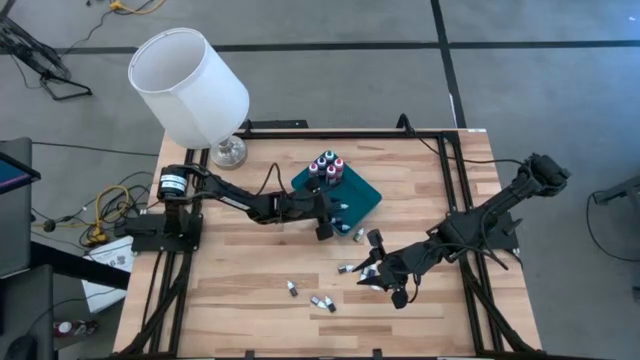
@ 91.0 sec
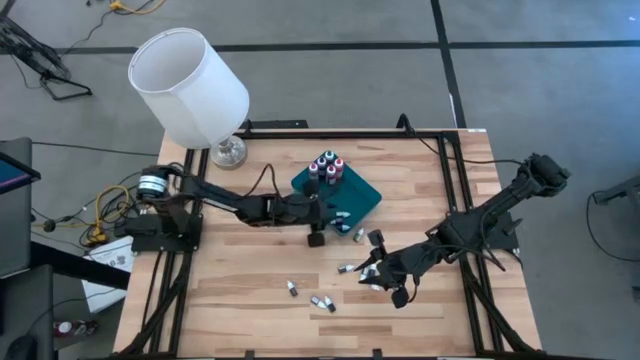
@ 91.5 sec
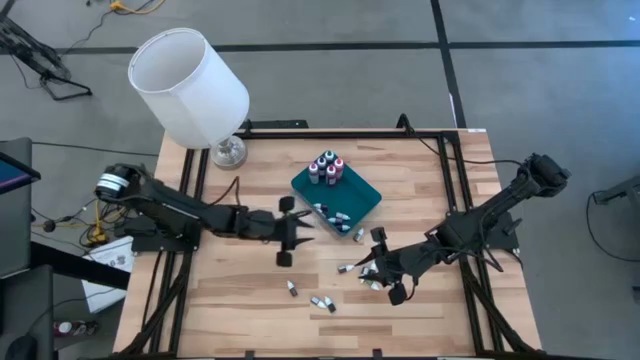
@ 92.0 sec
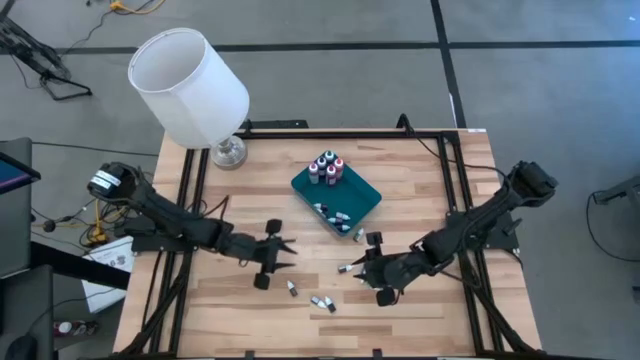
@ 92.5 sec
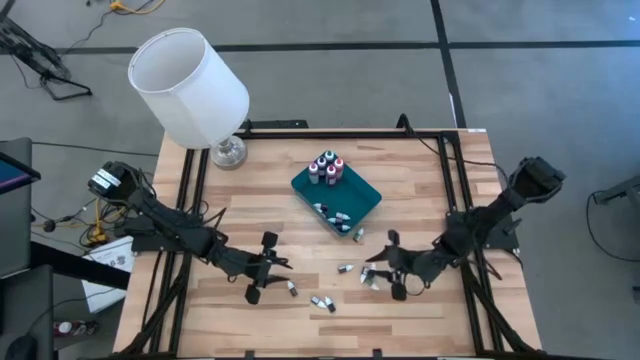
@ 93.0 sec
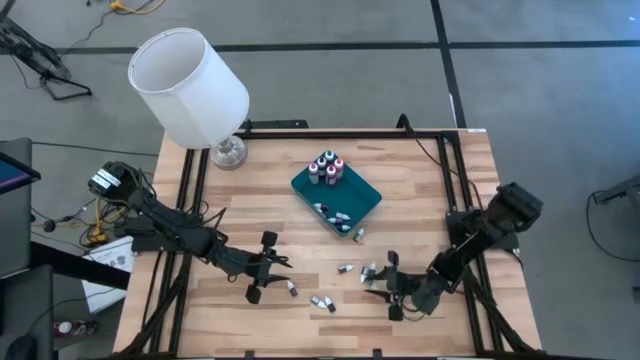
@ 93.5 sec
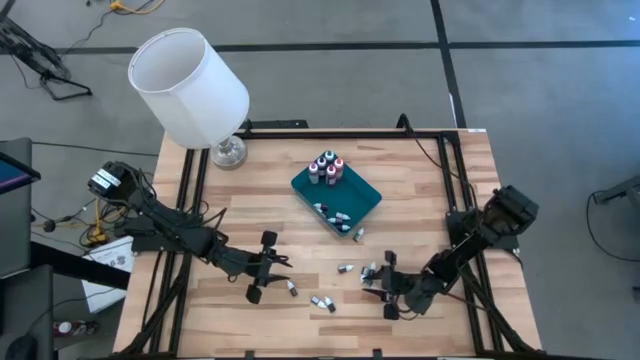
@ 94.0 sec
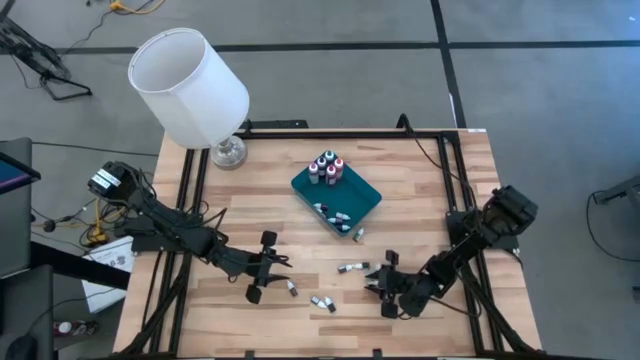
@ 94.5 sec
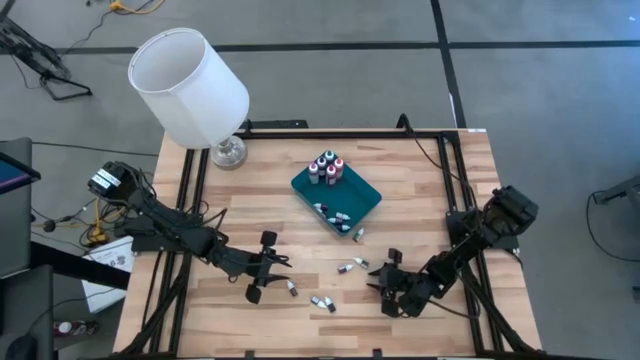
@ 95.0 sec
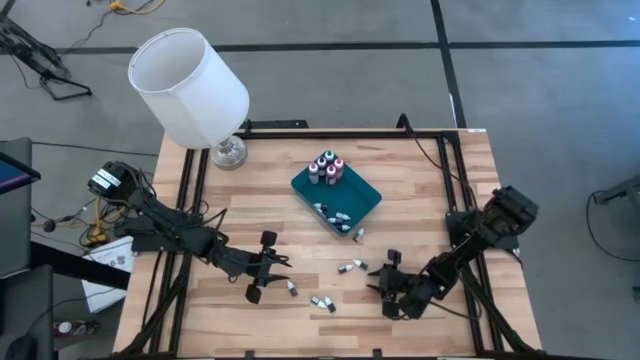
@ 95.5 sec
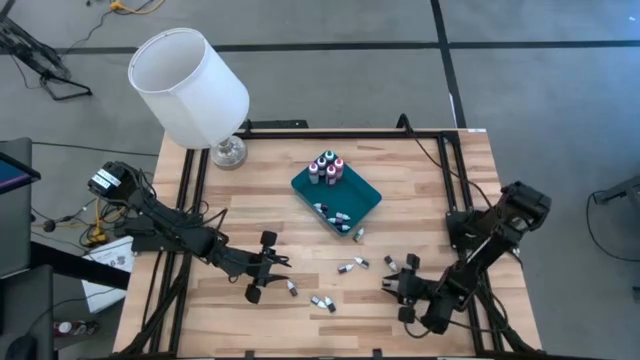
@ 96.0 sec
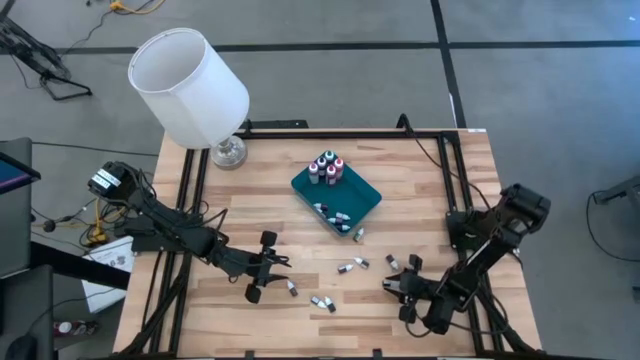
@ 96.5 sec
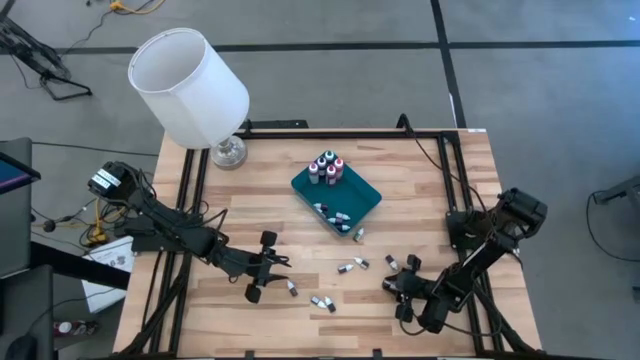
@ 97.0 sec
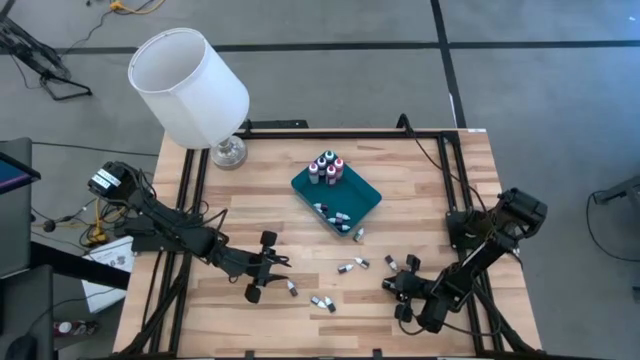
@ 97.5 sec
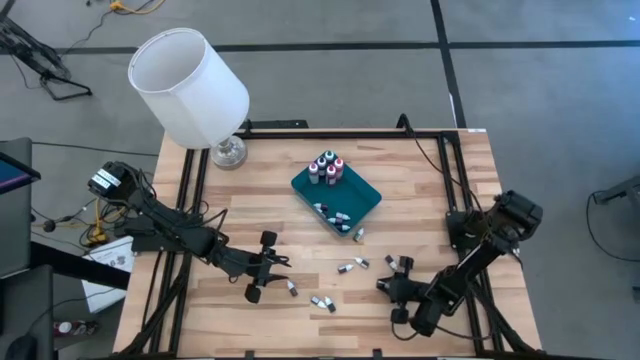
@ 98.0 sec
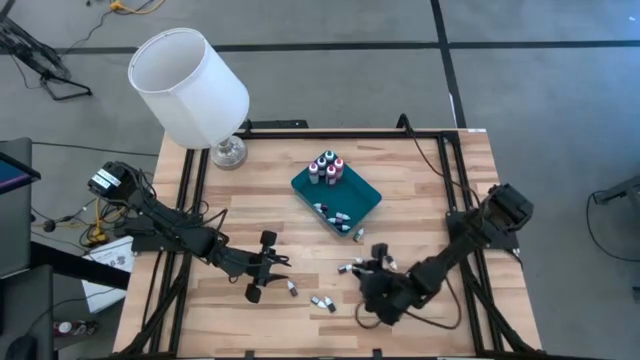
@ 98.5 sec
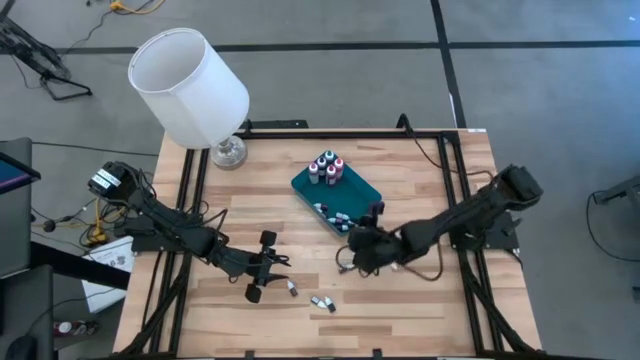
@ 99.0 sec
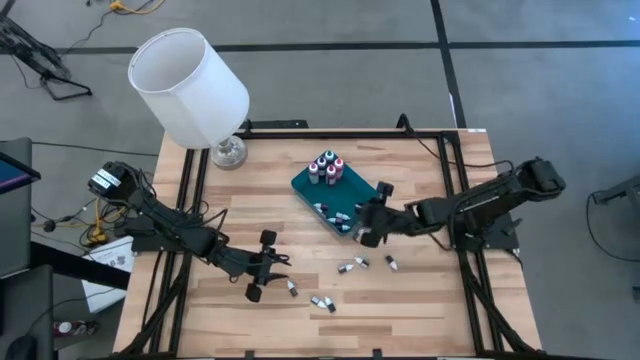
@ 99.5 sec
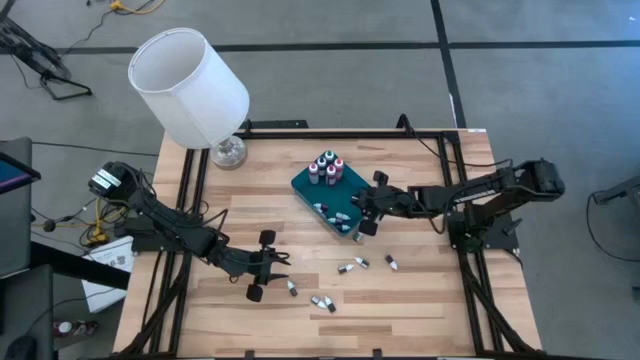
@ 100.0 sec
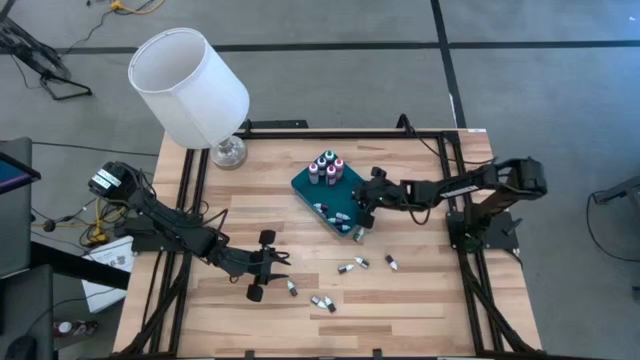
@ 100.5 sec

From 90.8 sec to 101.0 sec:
Task: Pick & Place food coloring
Put the small light green food coloring bottle into the blue bin

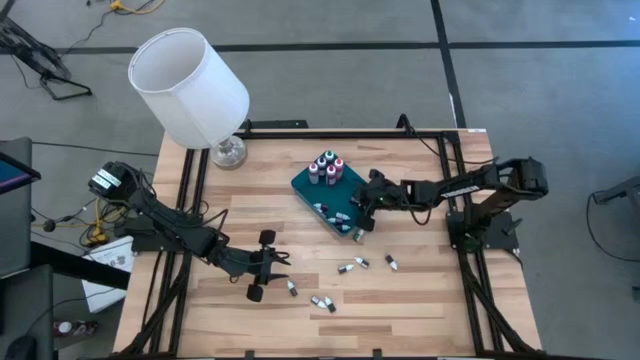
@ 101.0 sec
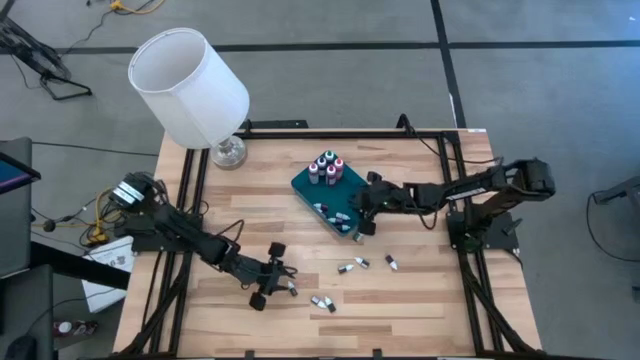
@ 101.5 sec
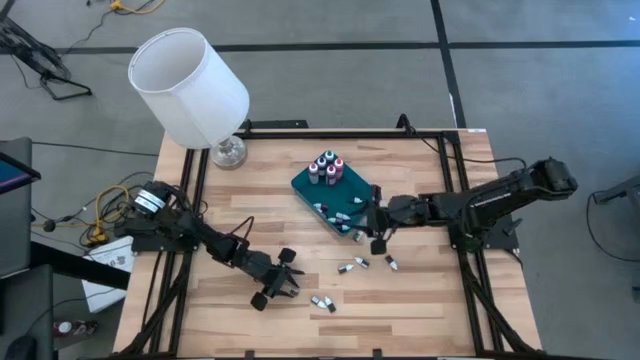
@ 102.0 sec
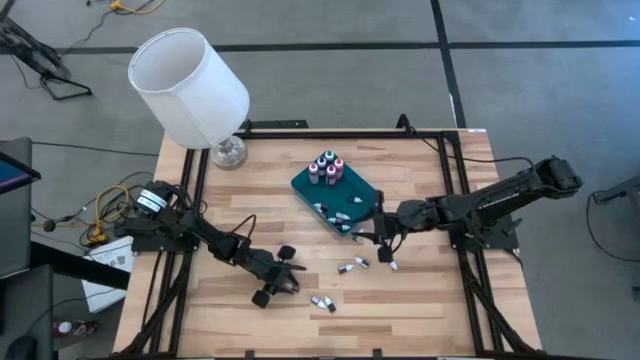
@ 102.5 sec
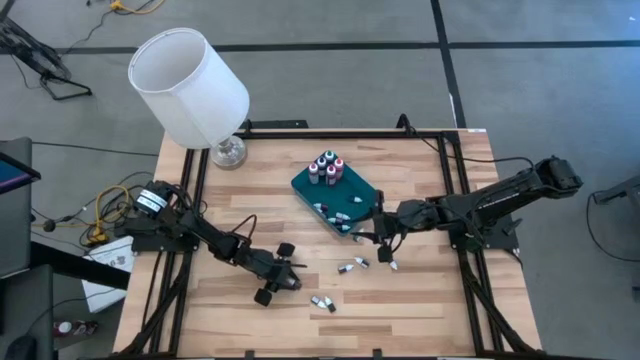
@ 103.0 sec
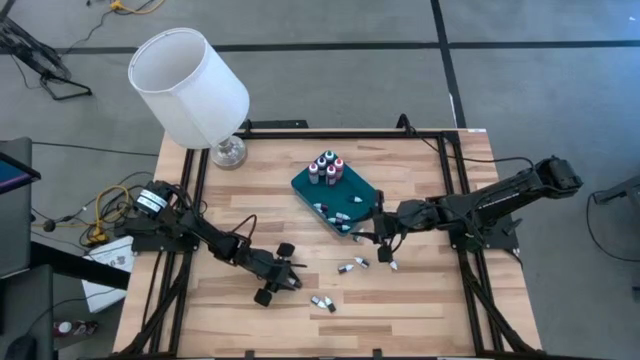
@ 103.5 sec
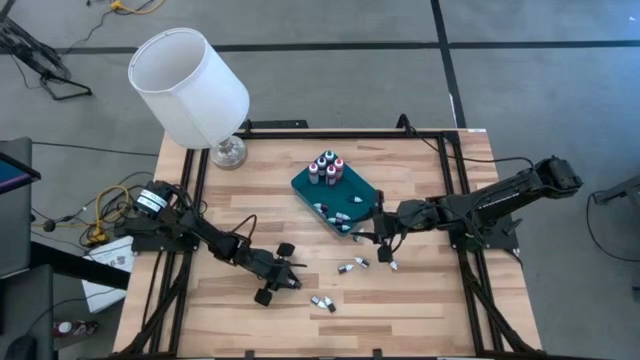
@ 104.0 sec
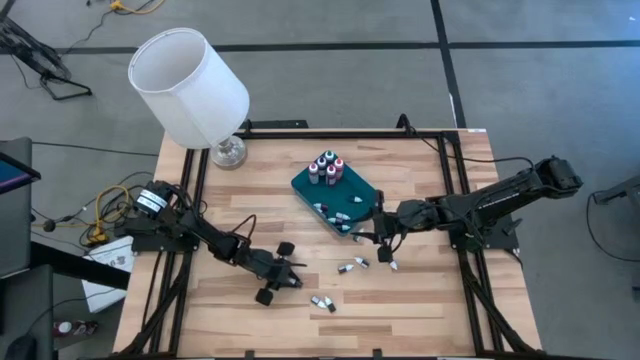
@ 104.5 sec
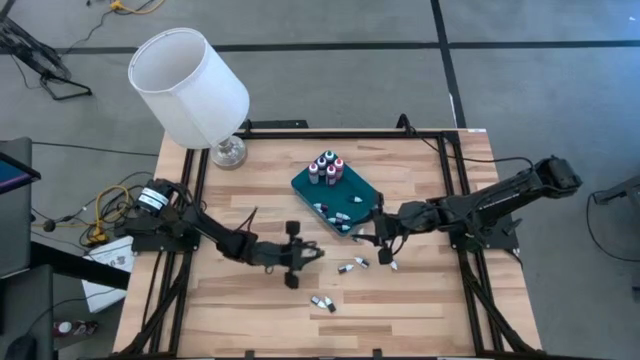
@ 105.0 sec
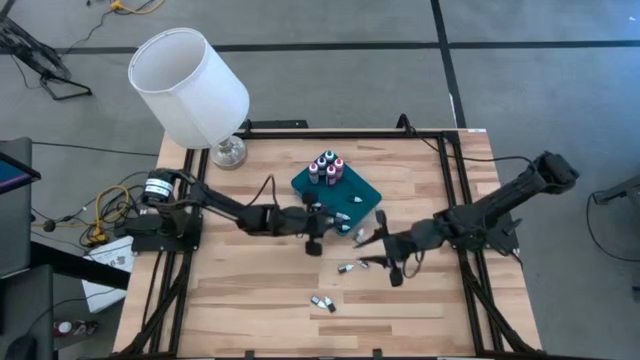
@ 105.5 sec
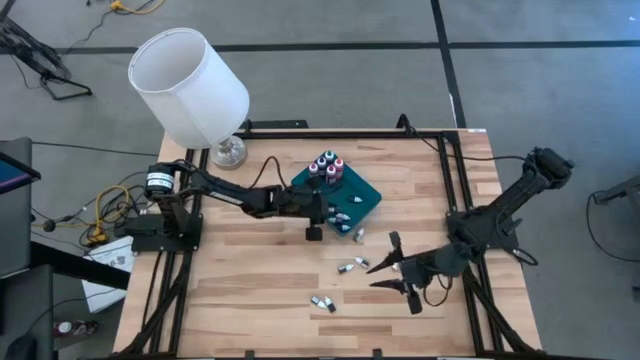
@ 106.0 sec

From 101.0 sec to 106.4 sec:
Put the small brown food coloring bottle into the blue bin

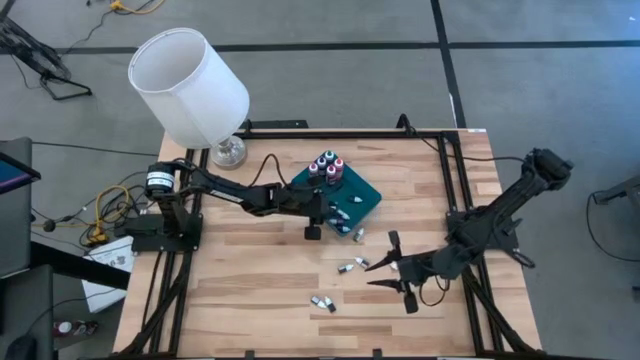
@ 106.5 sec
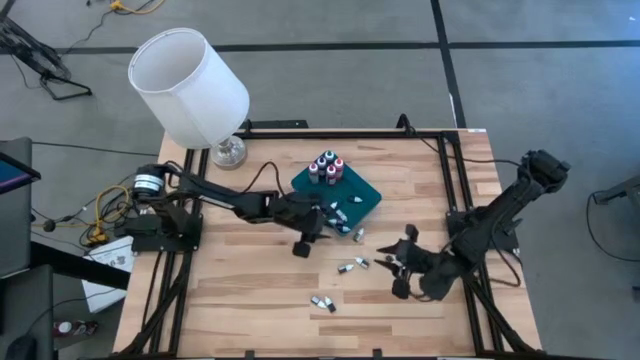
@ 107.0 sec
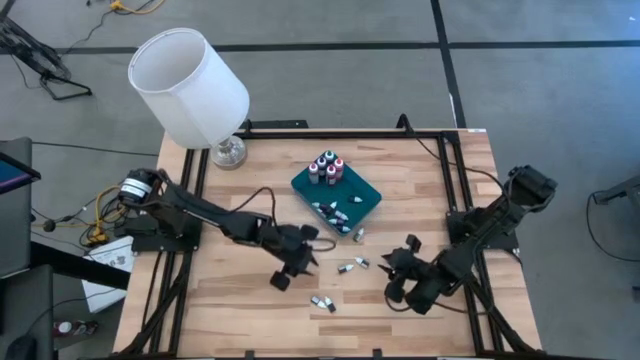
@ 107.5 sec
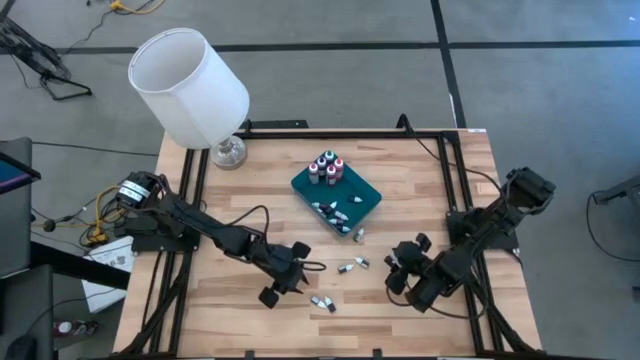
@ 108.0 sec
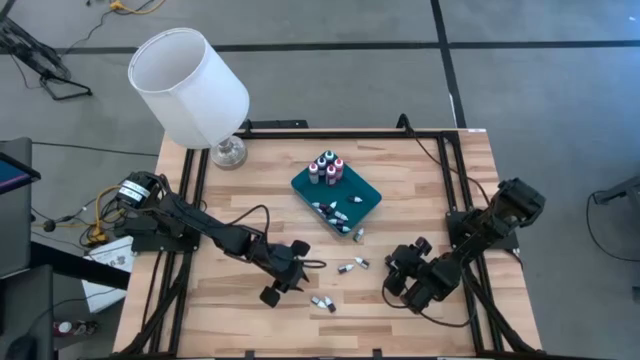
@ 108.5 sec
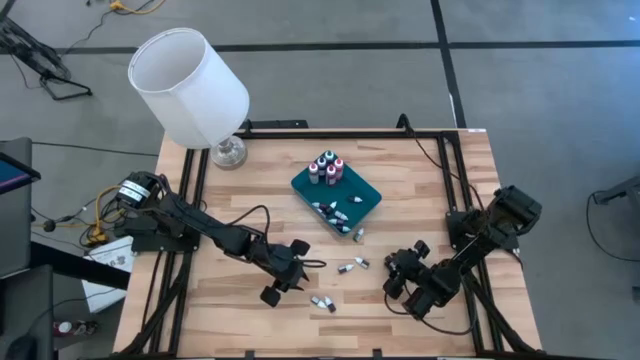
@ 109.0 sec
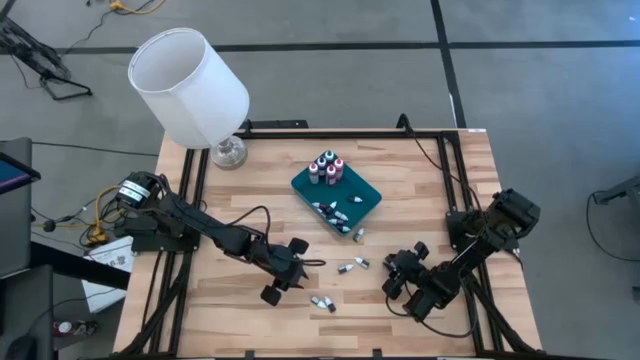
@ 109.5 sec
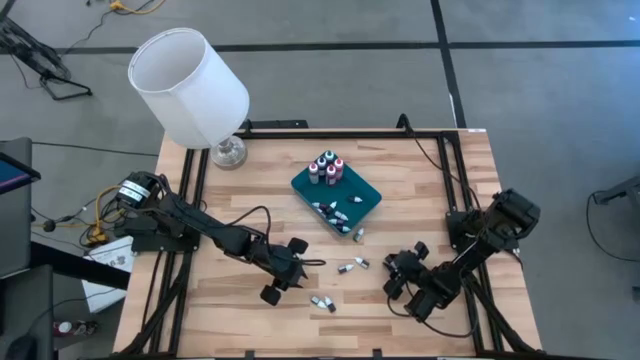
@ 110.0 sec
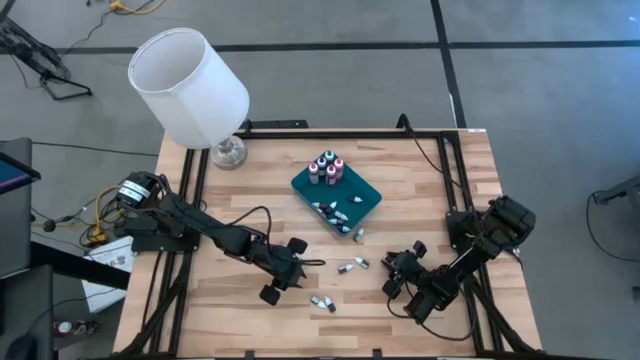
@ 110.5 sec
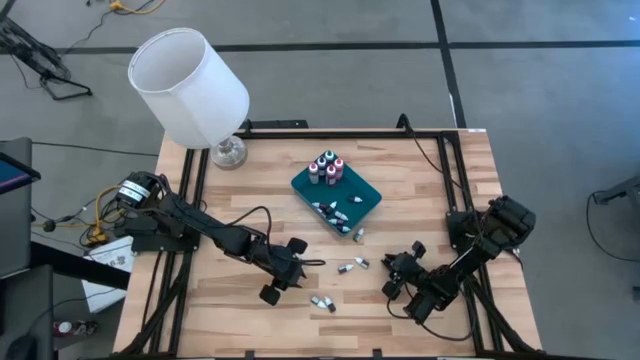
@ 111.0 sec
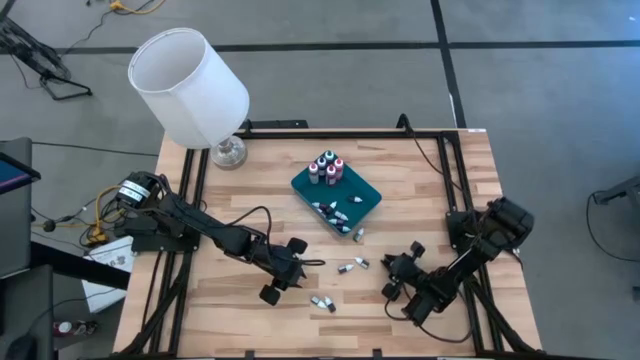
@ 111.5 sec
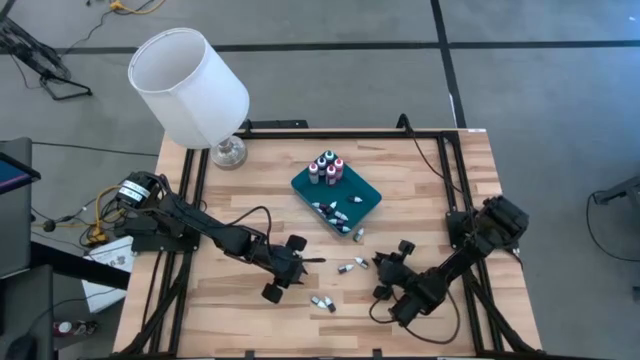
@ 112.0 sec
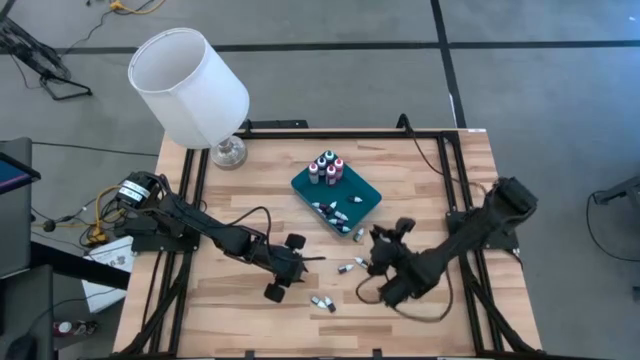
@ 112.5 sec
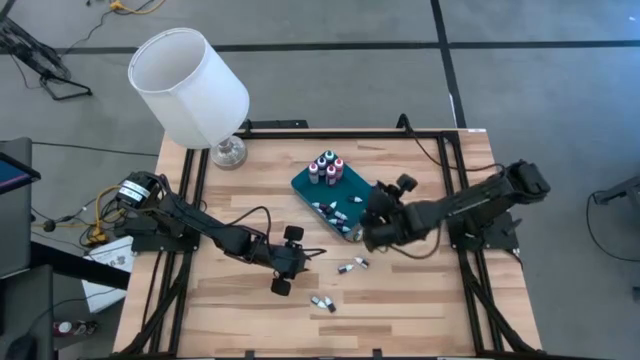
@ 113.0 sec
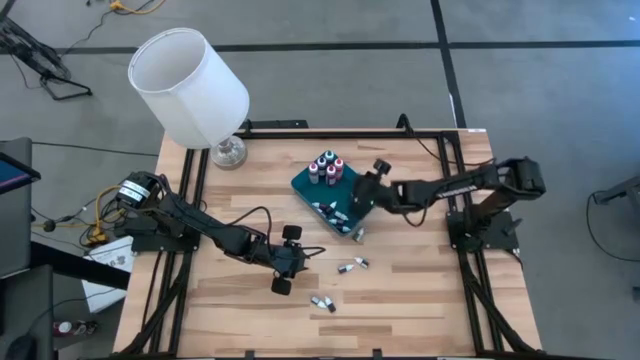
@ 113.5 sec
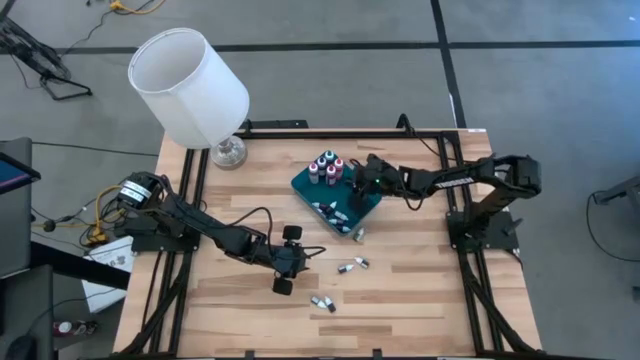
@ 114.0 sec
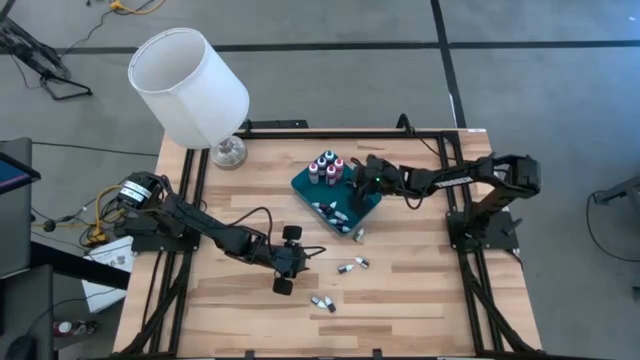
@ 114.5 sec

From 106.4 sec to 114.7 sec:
Put the small violet food coloring bottle into the blue bin
